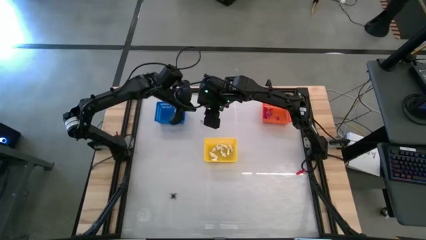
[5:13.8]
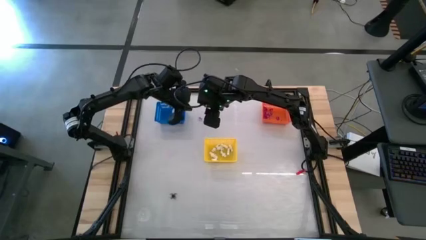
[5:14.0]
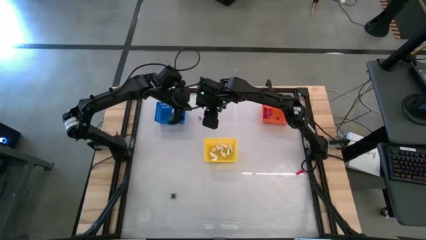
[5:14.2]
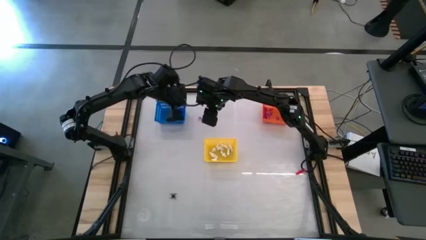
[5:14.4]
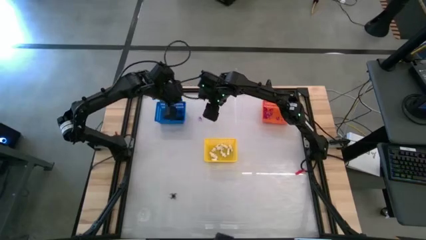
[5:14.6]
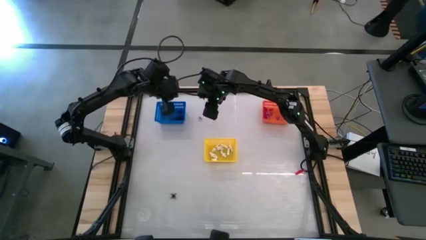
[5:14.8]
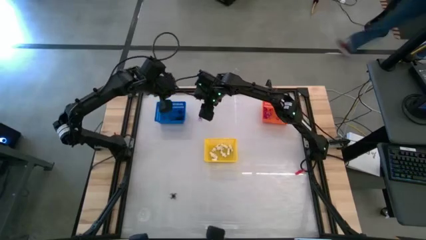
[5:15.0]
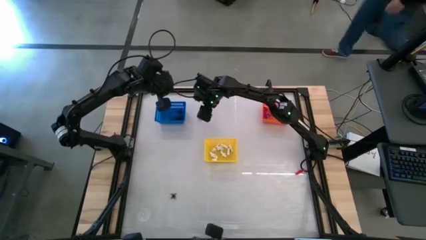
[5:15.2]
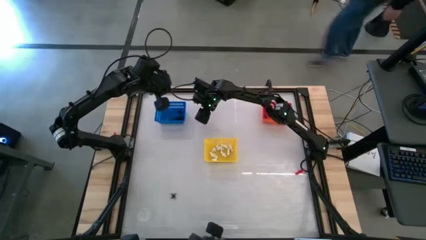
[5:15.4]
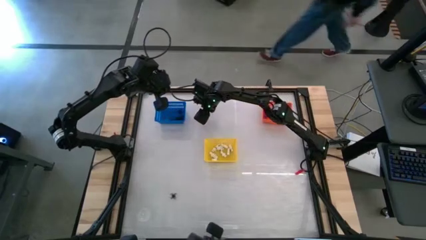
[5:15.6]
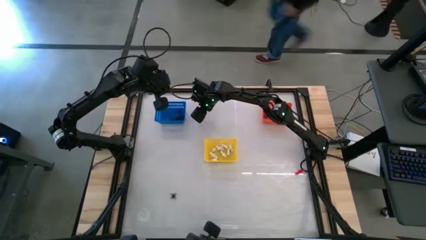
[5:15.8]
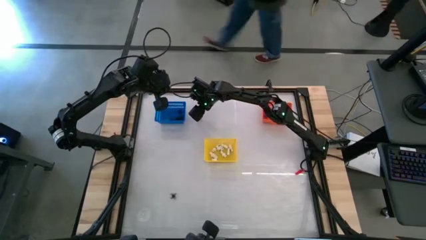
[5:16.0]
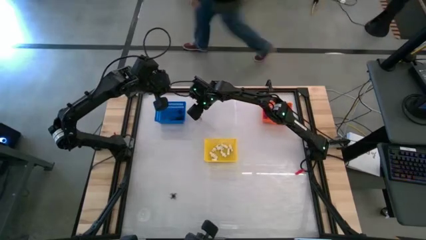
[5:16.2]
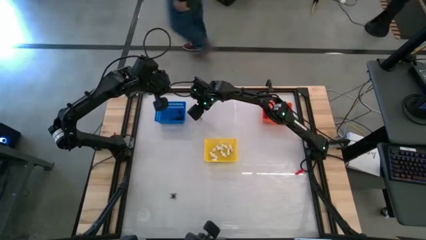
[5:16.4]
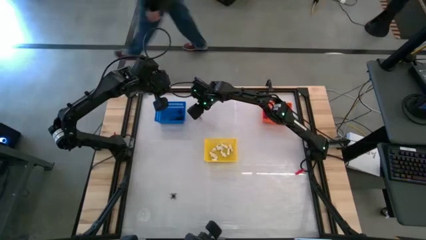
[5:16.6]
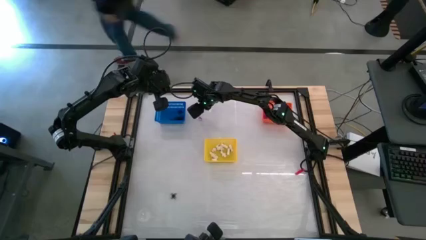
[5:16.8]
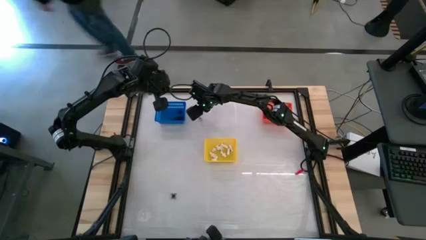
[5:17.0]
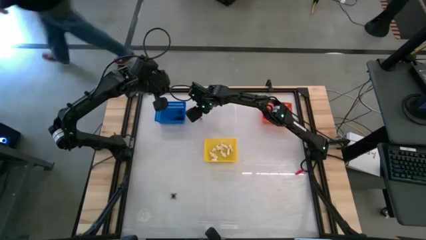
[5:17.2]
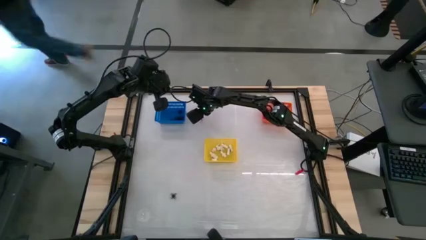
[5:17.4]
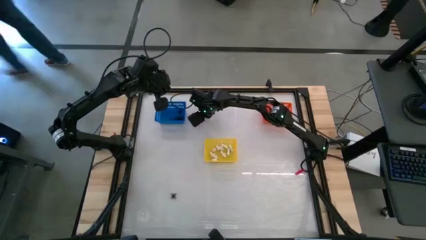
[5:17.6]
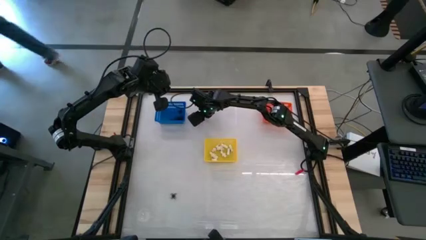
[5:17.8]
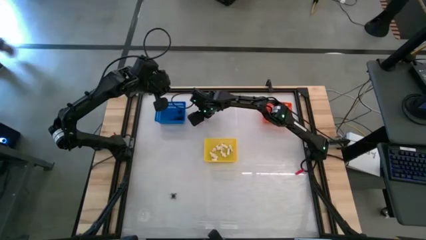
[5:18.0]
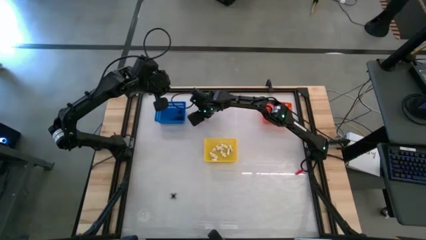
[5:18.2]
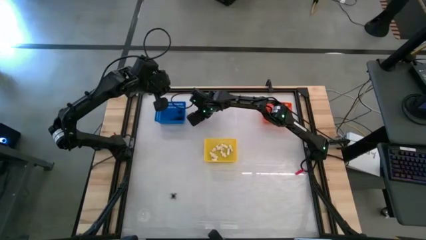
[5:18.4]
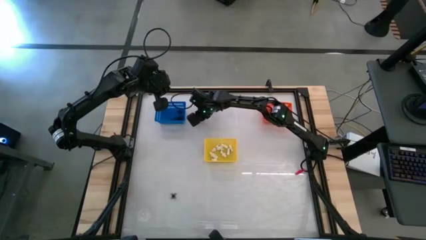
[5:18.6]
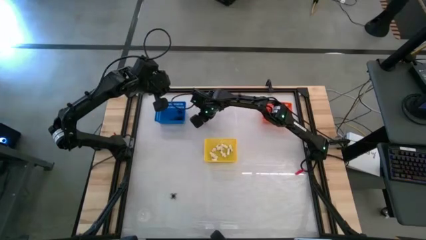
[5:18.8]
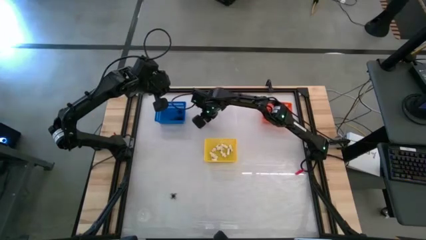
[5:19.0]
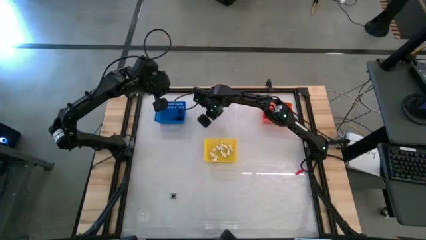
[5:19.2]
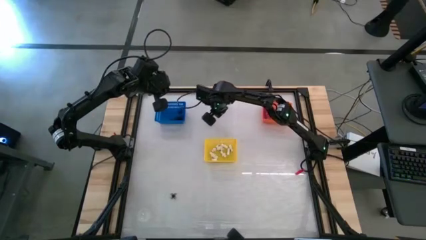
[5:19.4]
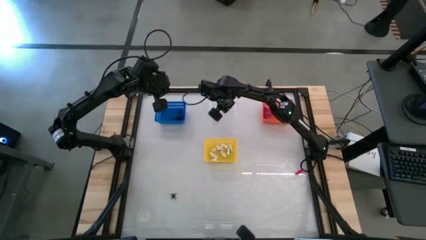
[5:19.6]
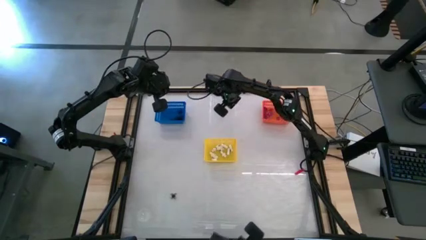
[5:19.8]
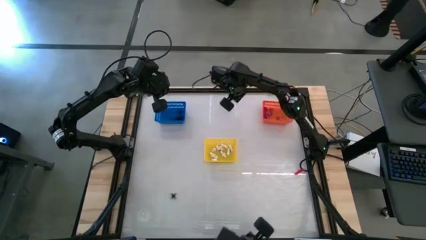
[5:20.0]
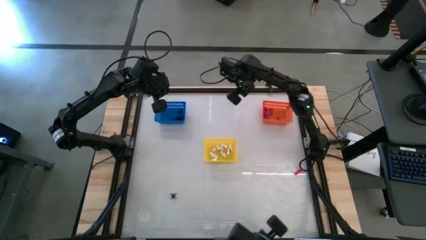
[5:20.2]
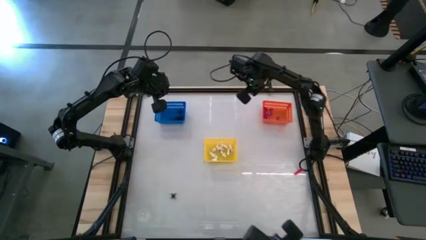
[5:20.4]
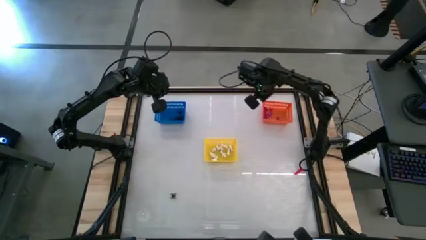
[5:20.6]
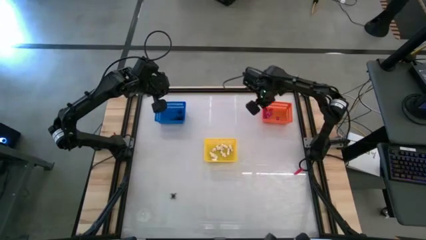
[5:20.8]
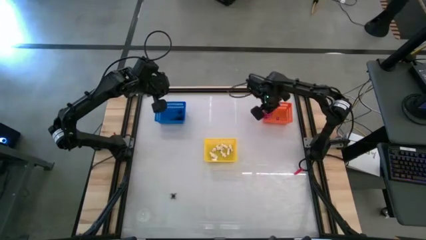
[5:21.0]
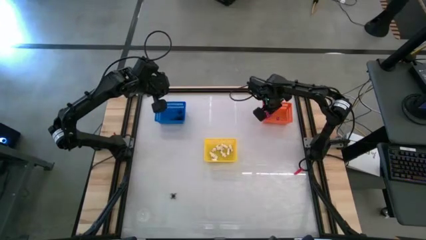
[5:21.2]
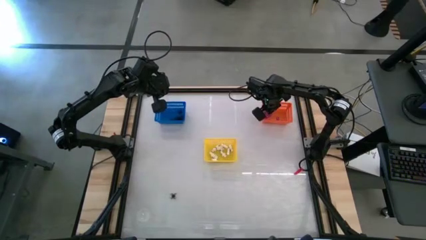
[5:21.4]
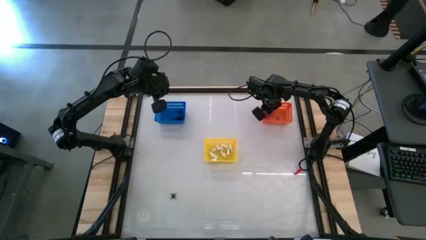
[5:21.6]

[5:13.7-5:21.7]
Task: Sort Halloween decoration
Put the purple witch hat toy into the orange bin

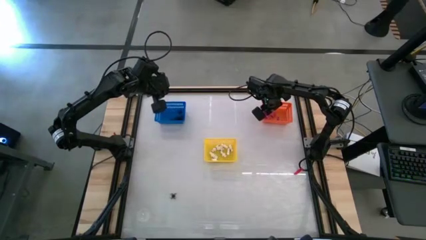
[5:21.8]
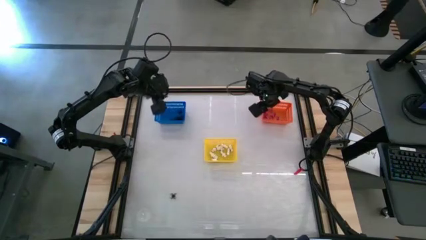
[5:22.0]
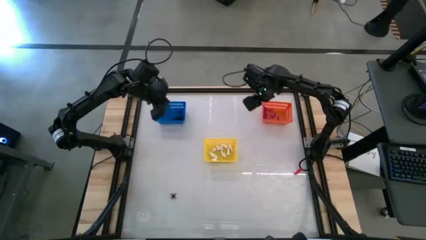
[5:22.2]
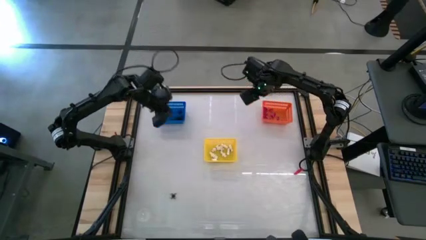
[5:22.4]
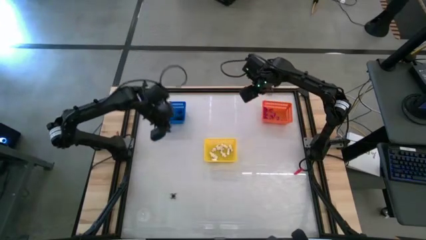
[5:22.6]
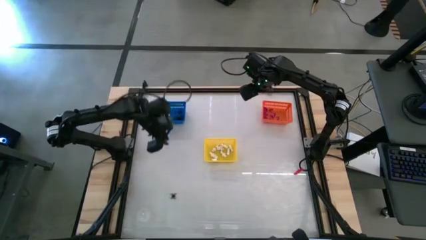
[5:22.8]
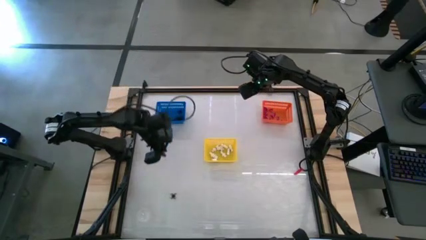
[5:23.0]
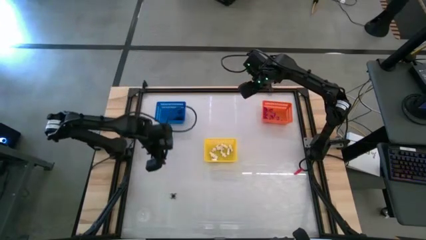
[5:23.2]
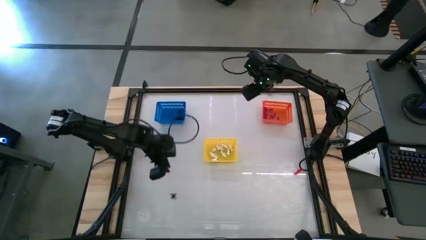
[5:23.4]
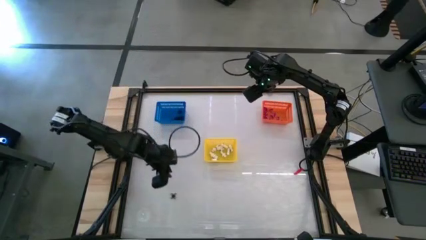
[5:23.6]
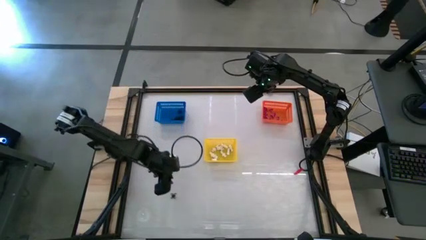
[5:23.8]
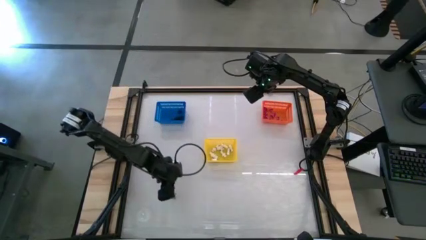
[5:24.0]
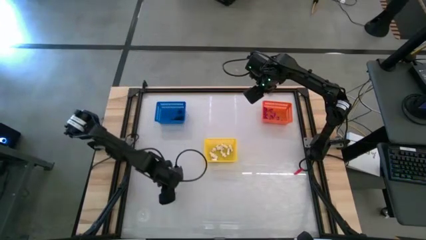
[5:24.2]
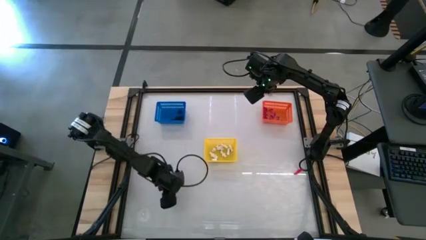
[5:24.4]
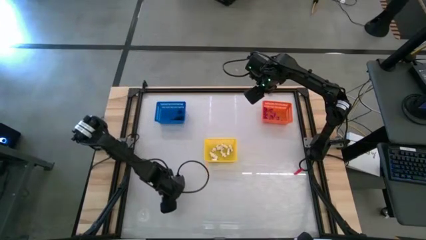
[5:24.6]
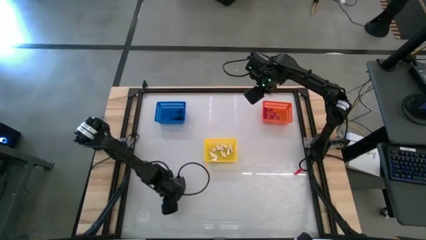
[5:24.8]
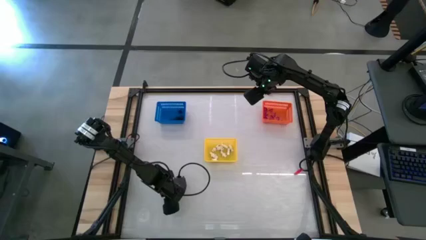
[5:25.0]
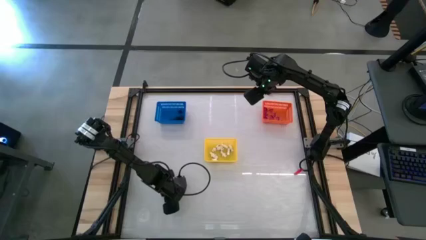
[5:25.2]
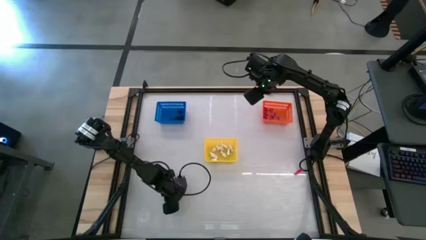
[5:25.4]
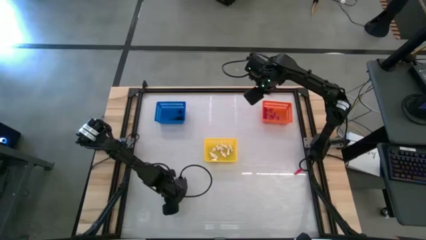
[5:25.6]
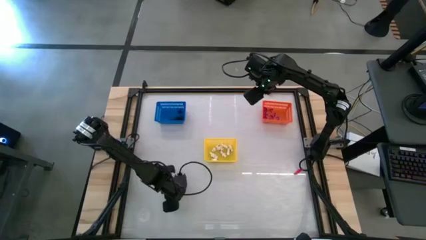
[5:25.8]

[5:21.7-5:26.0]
Put the black spider toy into the blue bin

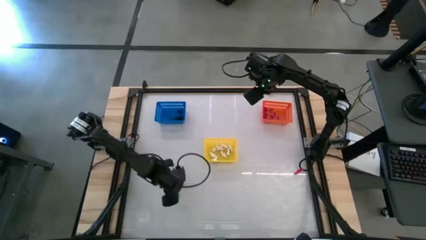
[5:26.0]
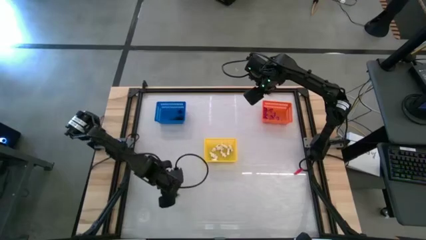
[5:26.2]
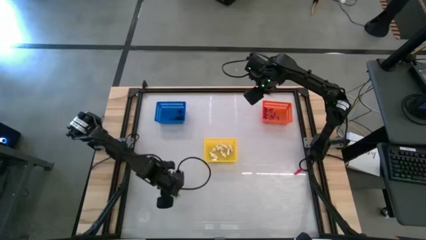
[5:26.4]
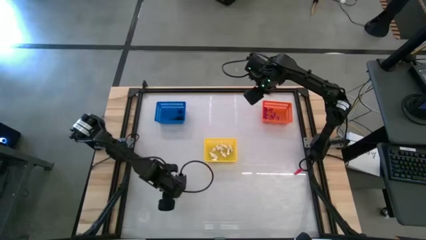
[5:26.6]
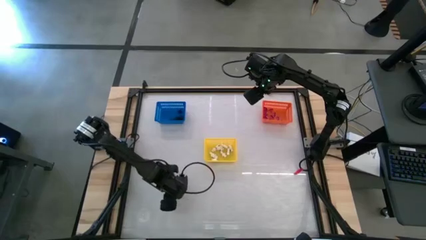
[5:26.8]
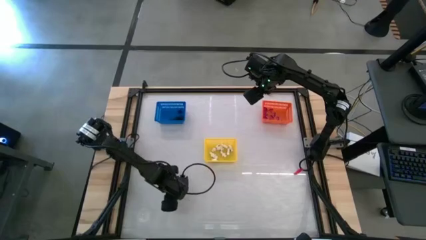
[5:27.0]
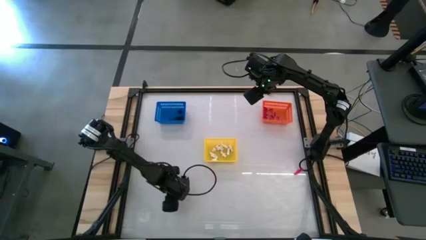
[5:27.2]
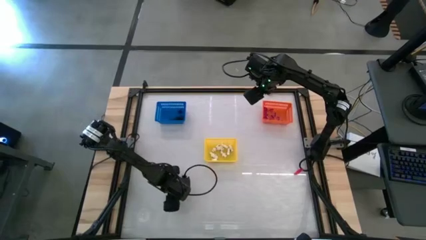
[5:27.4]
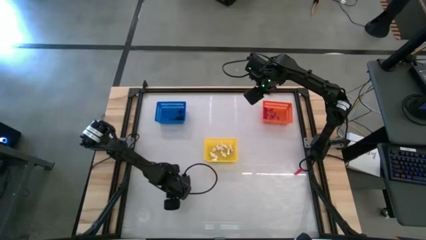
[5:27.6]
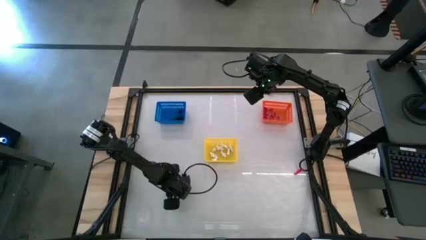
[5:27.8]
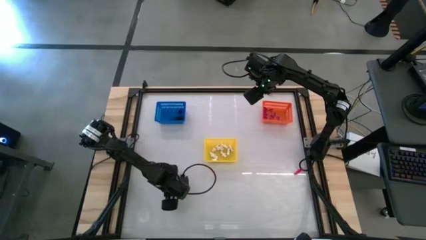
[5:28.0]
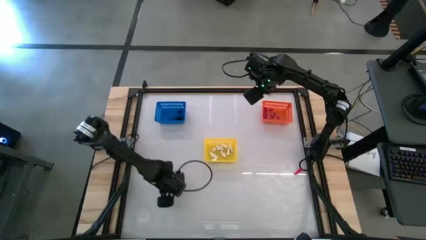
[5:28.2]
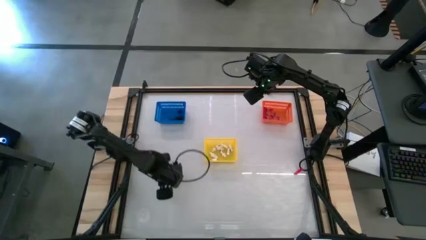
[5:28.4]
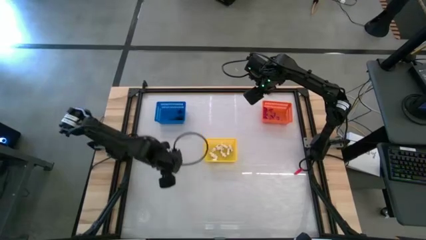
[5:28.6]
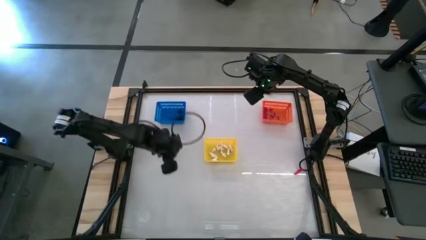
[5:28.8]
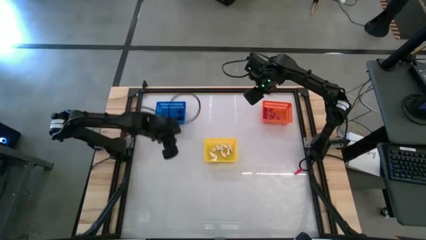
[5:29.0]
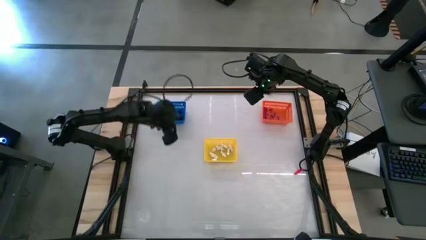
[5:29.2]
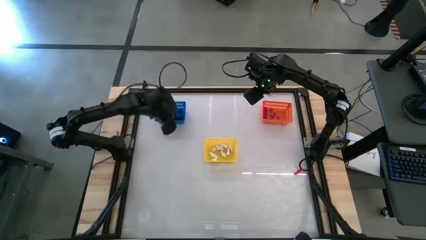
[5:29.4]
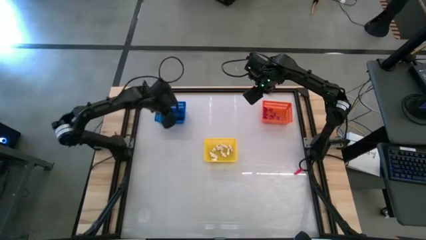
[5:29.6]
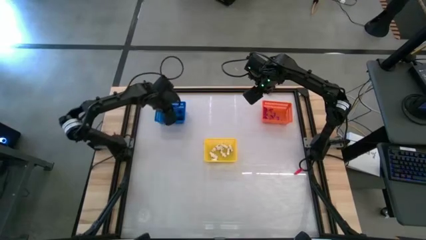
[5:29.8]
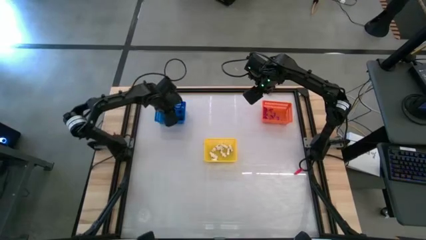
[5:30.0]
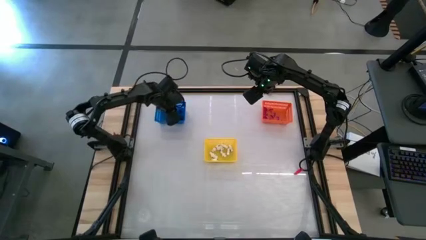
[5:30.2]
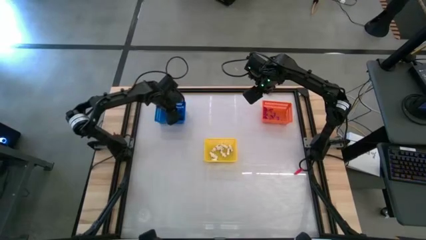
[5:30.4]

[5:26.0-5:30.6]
Put the black spider toy into the blue bin
